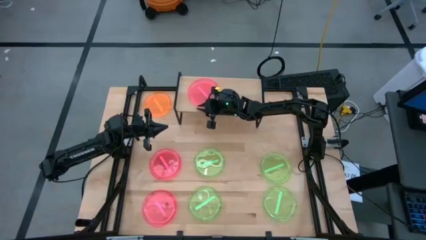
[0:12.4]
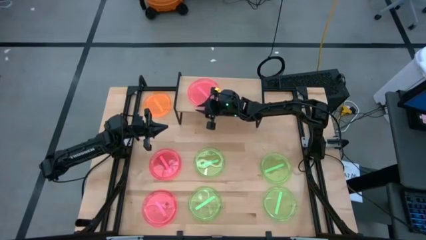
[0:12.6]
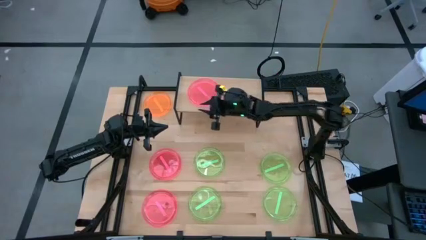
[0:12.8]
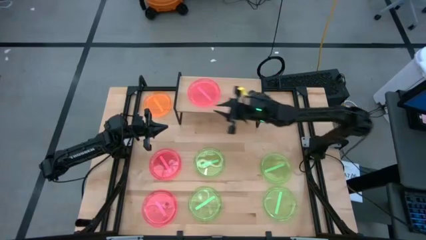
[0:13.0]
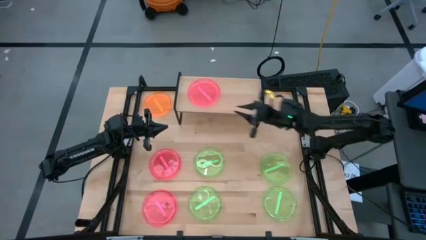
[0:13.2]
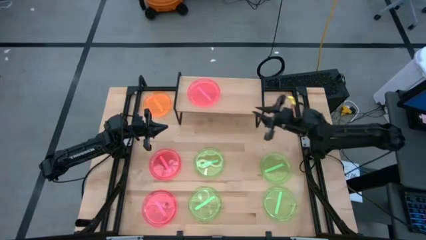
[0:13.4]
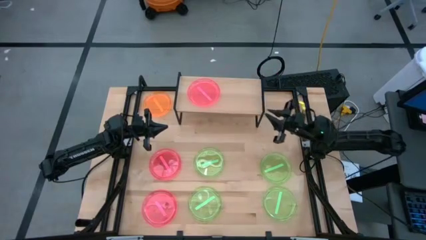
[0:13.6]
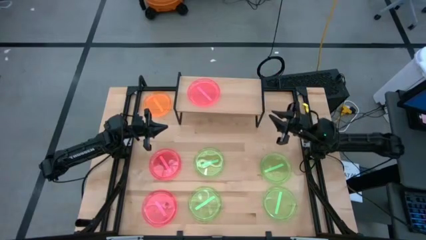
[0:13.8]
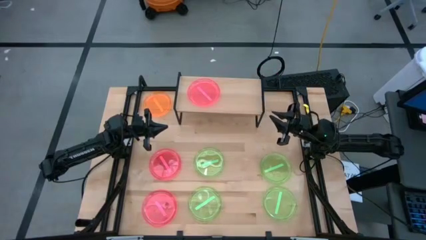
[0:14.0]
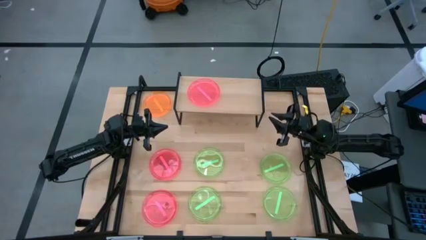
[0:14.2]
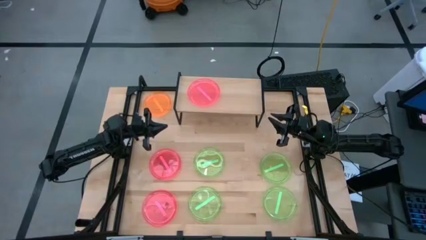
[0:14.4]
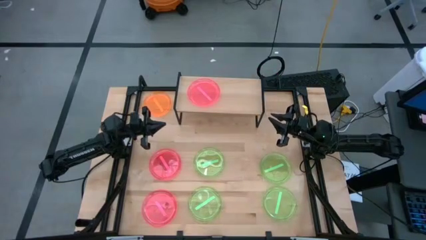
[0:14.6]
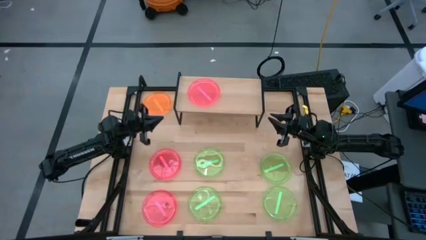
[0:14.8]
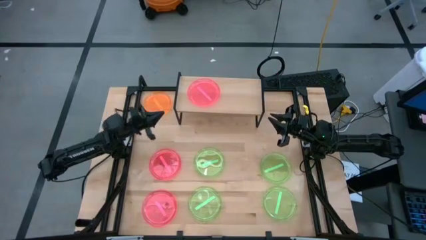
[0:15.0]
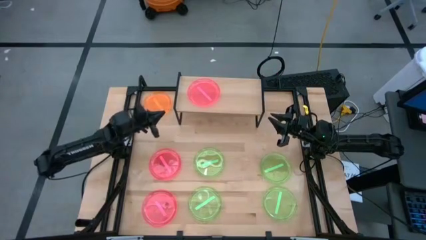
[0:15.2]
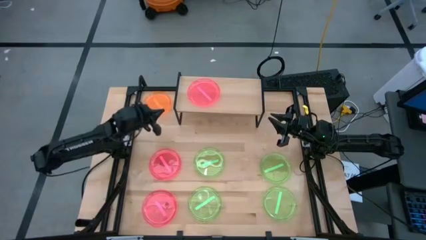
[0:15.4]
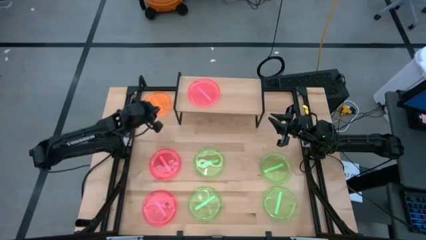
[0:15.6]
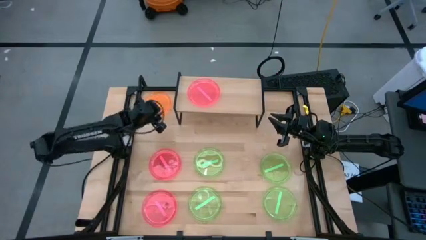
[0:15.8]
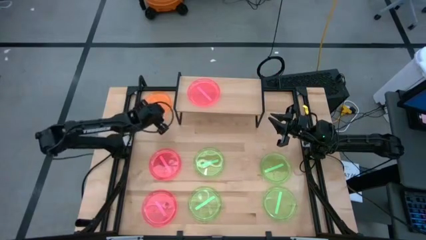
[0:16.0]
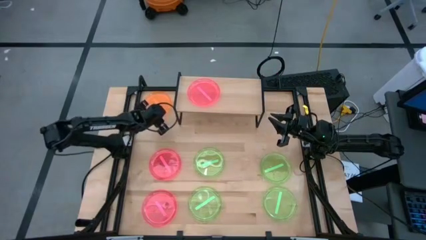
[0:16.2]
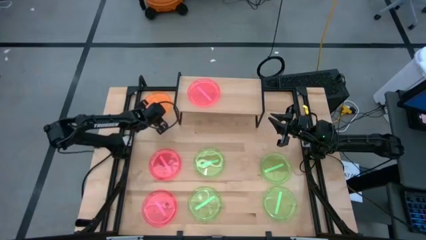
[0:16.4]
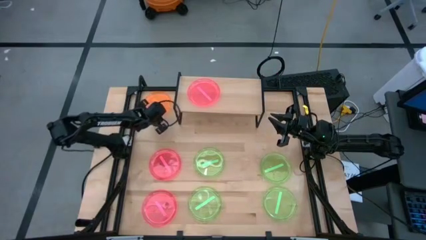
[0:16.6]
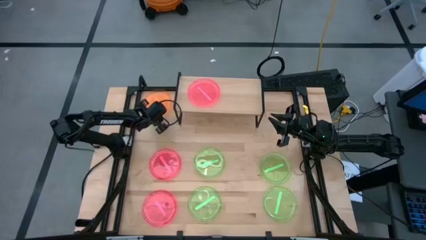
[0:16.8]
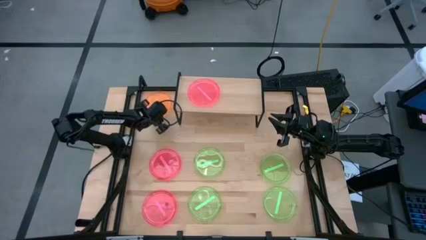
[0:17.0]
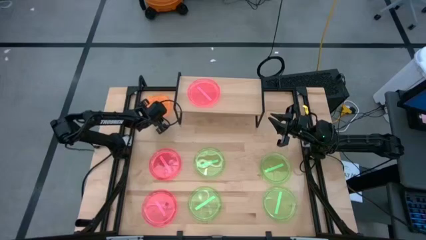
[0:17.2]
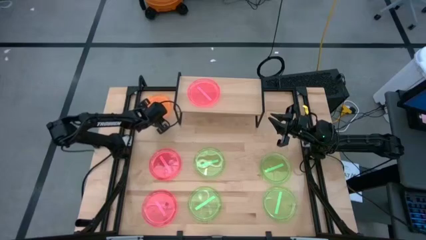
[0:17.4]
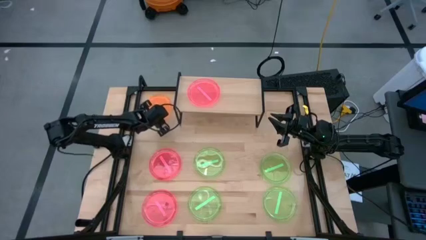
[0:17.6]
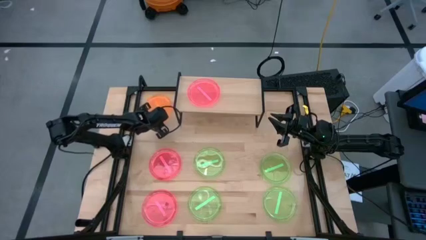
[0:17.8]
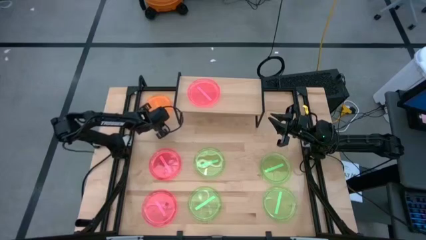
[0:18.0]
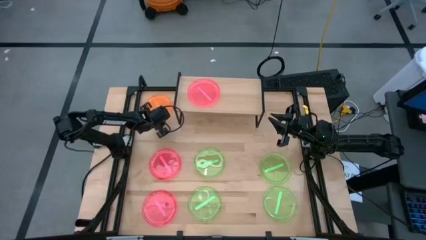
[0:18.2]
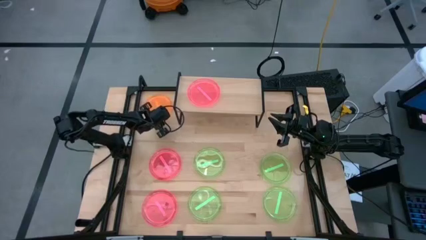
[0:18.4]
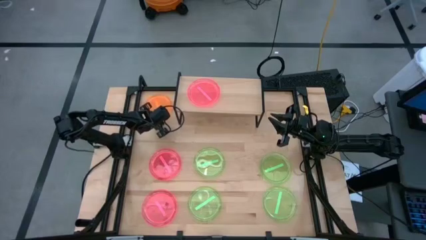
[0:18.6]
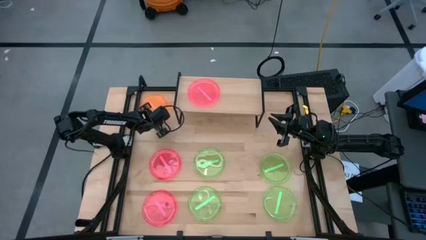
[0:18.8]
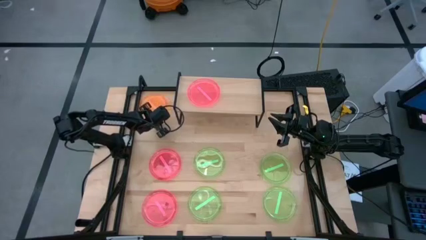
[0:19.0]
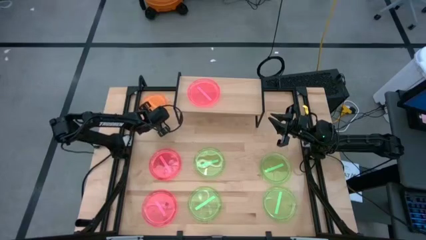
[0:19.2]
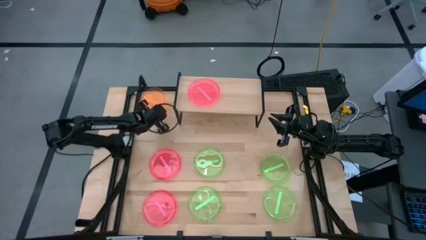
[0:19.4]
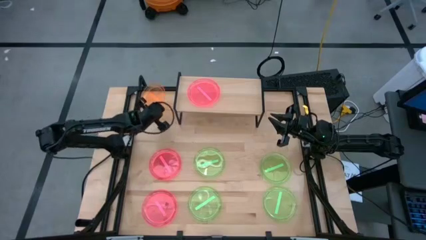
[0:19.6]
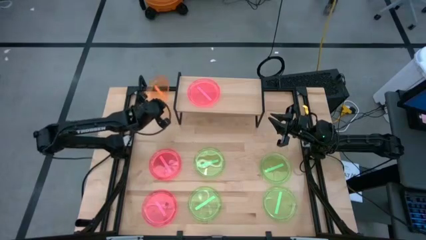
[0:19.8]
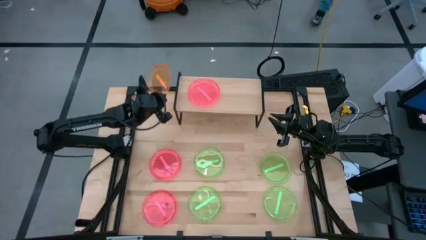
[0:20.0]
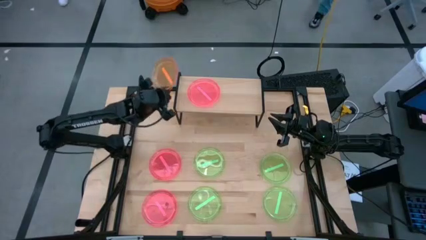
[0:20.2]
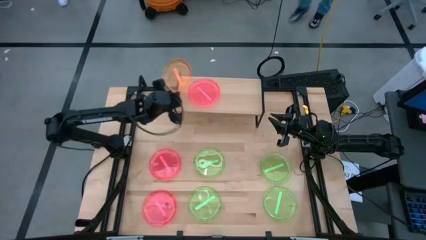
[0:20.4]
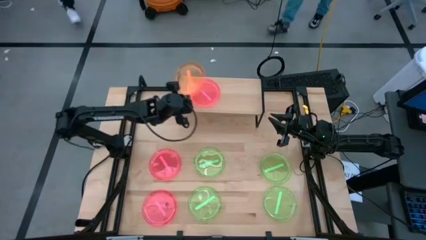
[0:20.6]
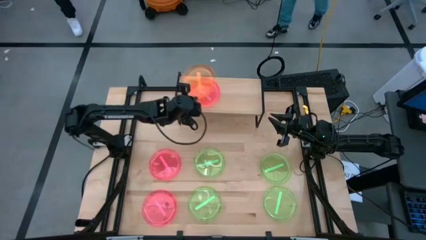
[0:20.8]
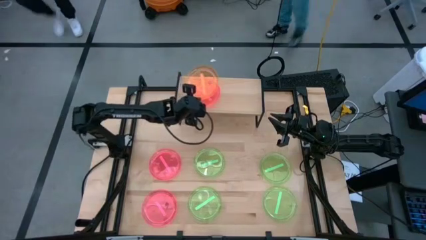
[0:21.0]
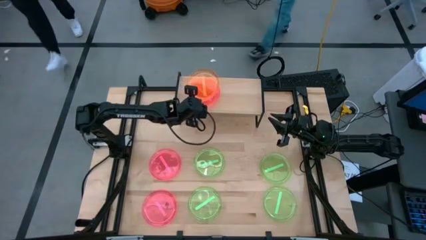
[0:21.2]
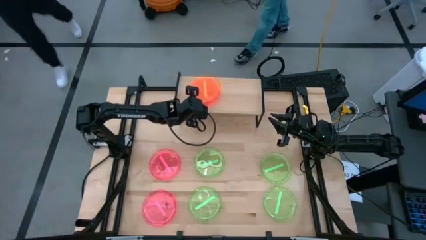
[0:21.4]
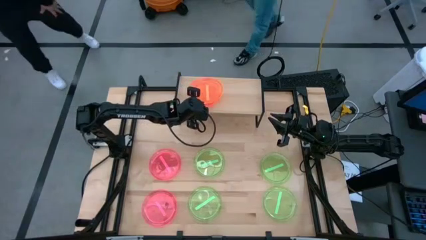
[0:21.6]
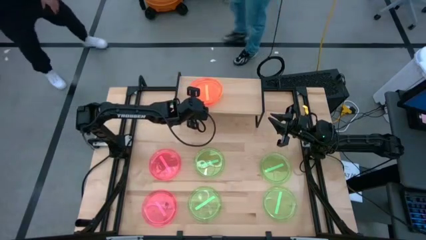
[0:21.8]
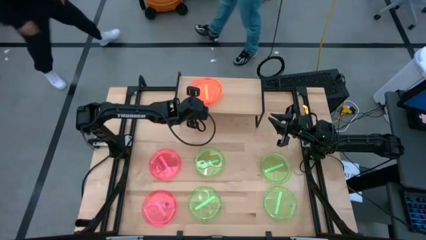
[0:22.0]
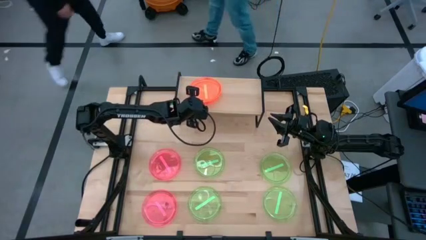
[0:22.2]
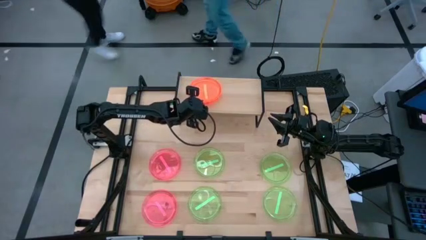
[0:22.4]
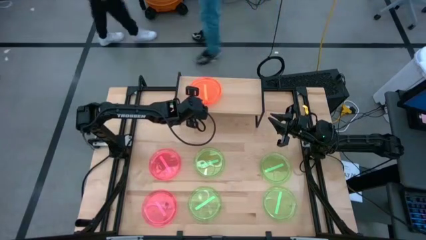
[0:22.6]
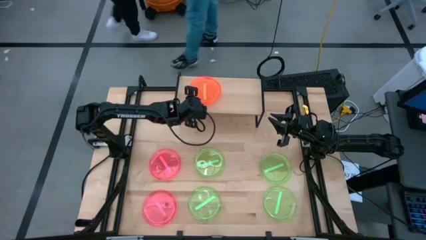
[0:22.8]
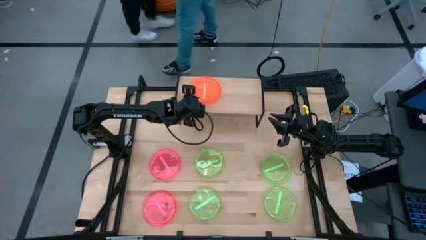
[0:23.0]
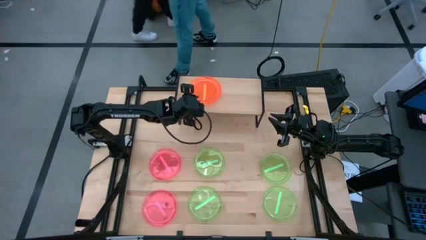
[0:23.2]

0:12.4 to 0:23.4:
Task: Place and stack plates onto a shelf
Stack the orange plate on top of the pink plate

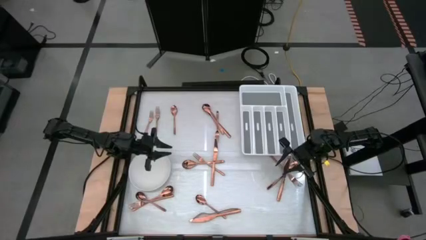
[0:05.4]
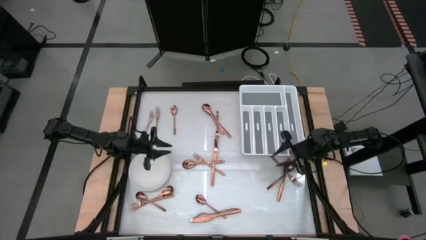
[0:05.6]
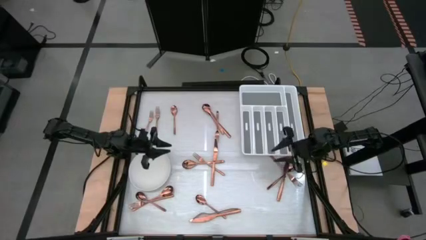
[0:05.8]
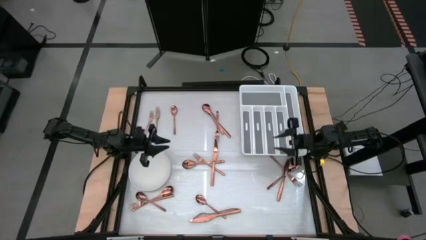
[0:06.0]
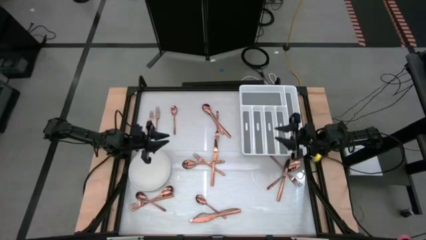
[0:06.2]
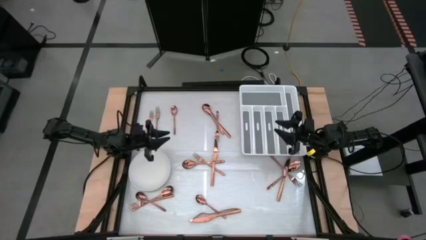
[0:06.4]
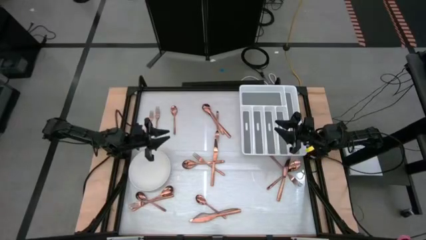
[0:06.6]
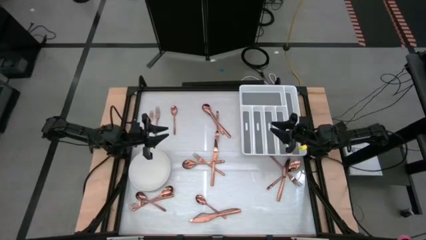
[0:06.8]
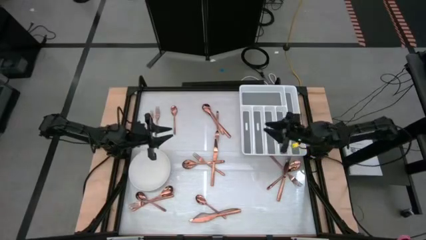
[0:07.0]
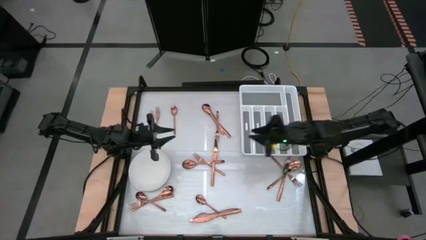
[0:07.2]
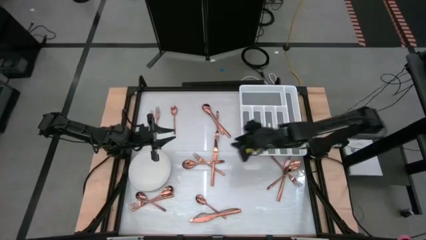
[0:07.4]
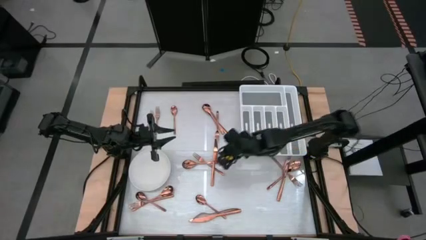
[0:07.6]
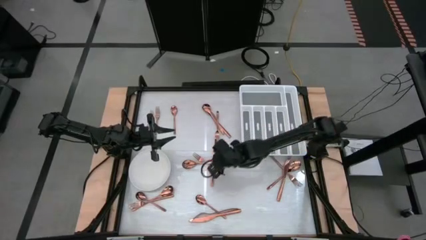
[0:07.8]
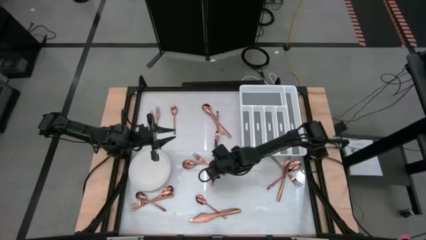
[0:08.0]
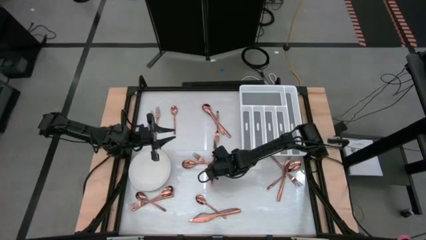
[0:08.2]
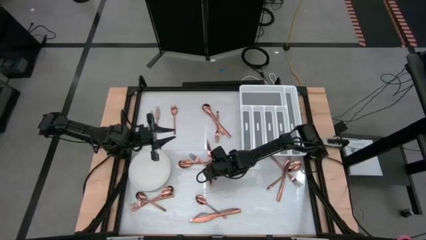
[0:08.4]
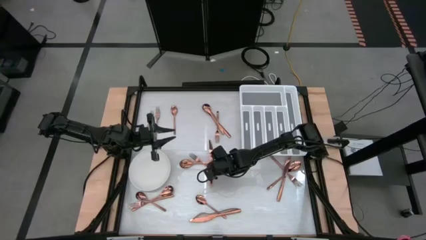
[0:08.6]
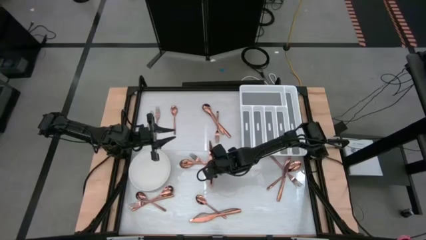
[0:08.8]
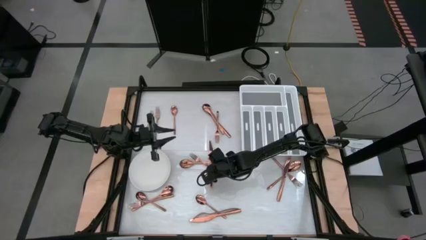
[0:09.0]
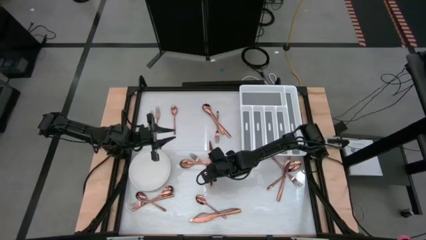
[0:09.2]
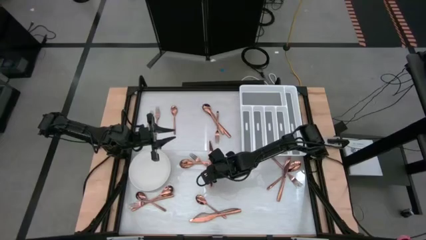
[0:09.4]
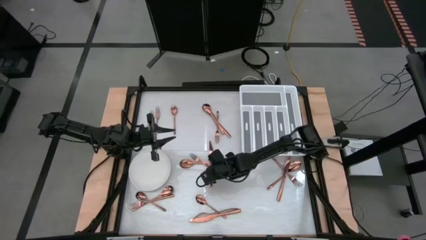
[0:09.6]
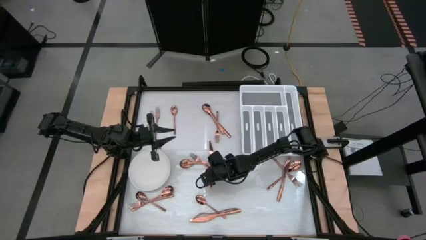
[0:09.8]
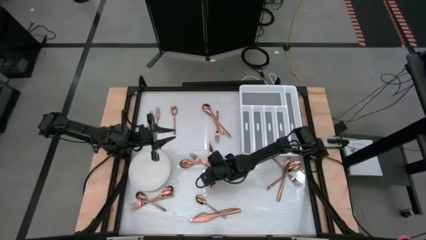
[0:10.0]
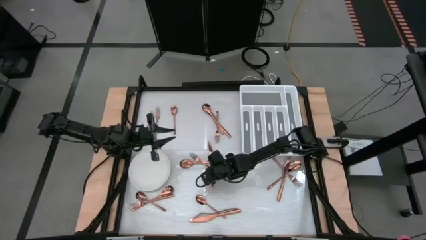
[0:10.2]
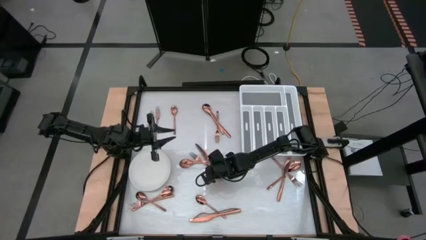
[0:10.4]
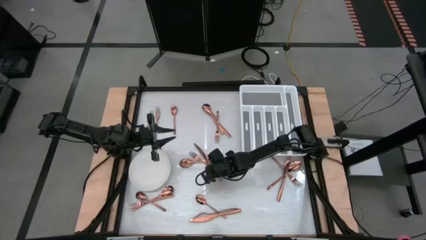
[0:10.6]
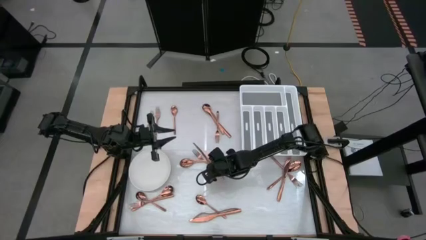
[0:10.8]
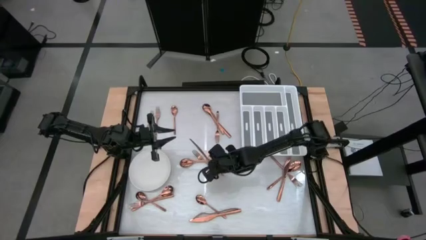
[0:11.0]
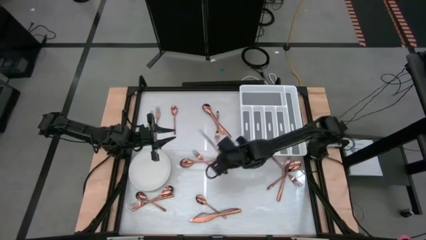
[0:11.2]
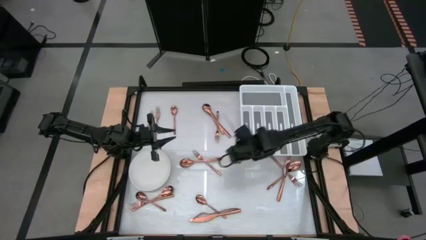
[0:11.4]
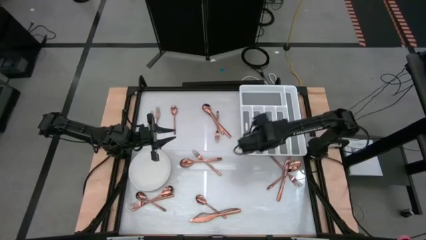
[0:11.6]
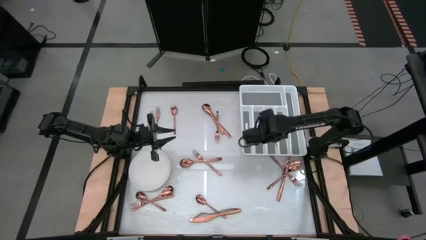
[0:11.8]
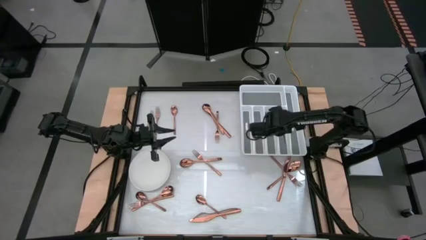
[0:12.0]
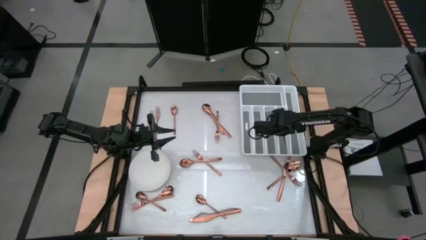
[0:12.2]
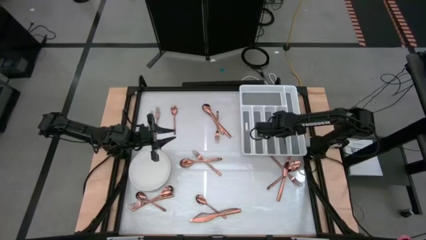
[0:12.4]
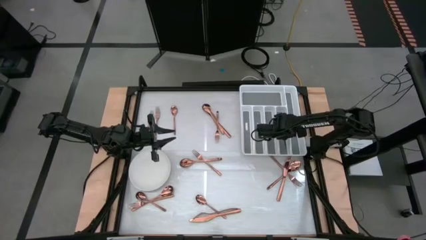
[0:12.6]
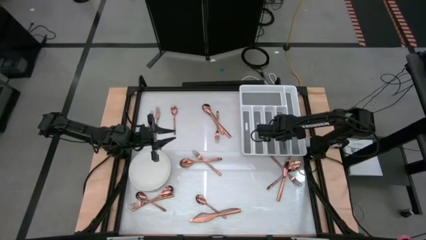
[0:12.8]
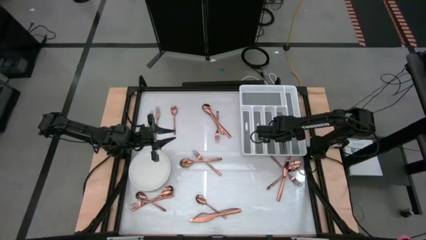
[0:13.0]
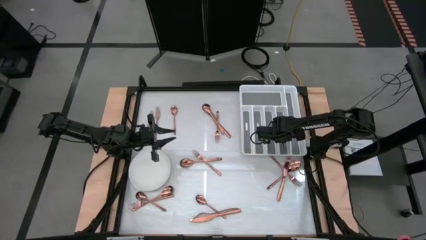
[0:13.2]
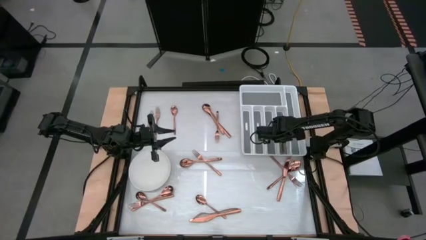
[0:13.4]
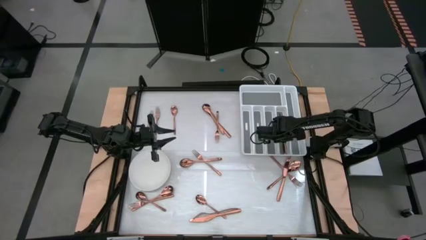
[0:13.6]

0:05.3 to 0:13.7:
Task: Sort silverware
Put the bronze knife into the silverware tray
